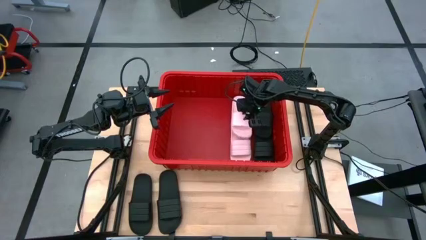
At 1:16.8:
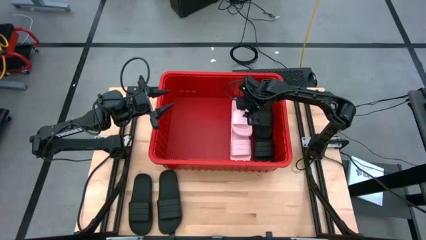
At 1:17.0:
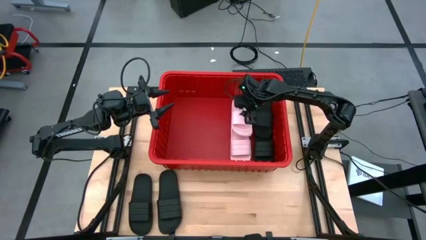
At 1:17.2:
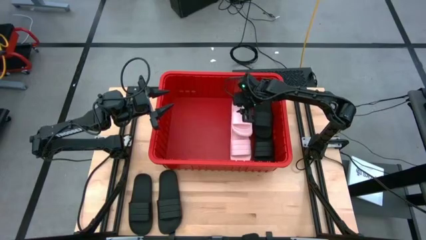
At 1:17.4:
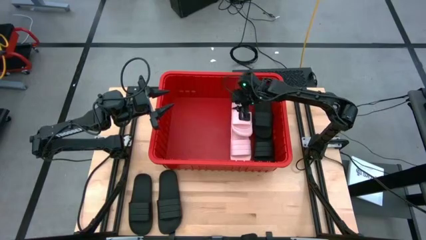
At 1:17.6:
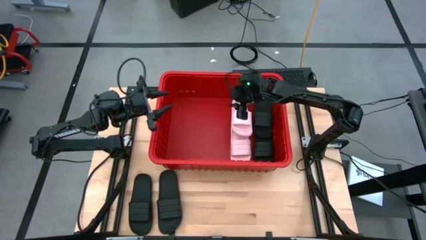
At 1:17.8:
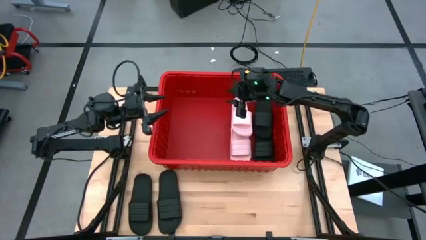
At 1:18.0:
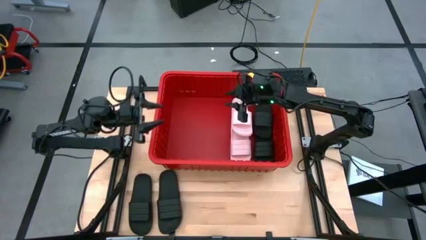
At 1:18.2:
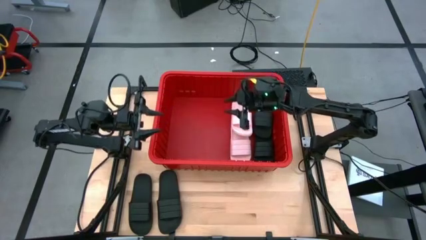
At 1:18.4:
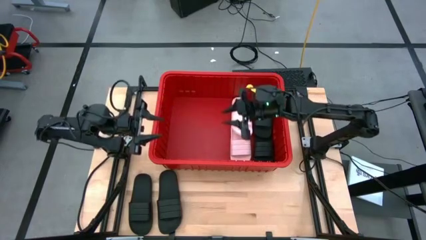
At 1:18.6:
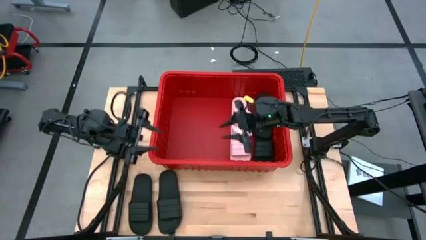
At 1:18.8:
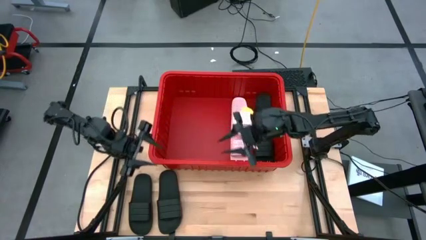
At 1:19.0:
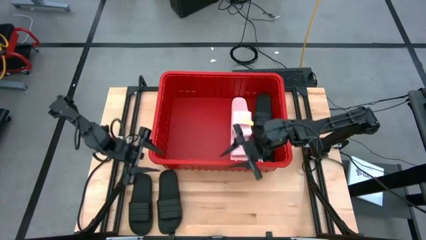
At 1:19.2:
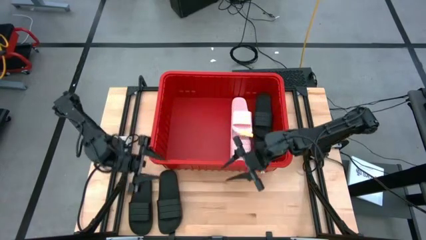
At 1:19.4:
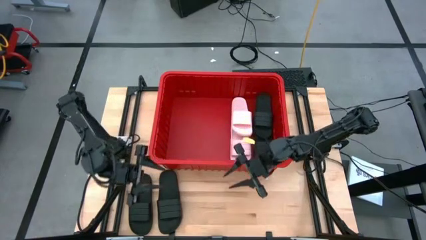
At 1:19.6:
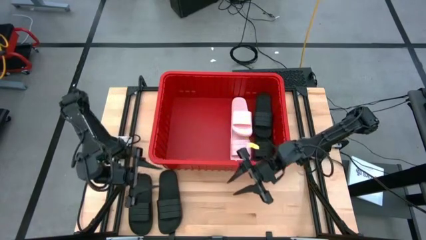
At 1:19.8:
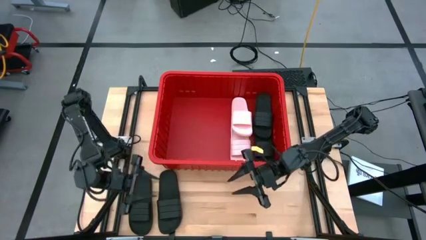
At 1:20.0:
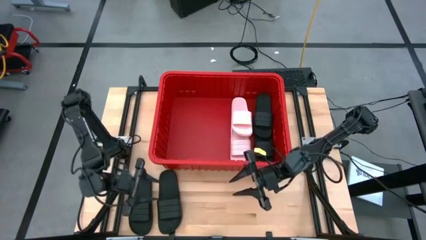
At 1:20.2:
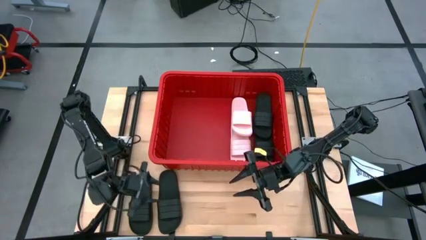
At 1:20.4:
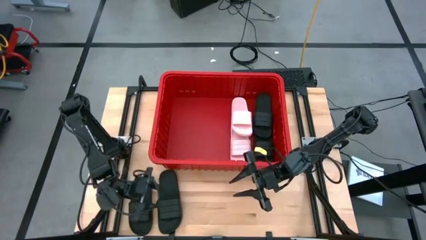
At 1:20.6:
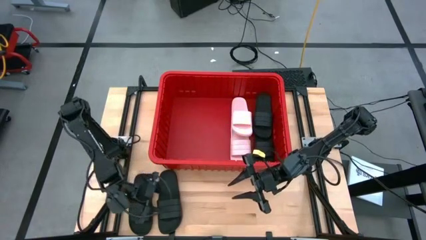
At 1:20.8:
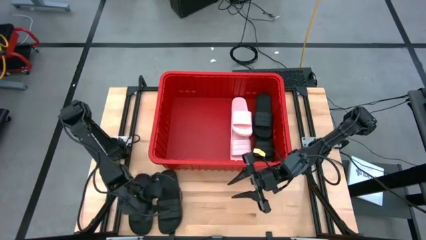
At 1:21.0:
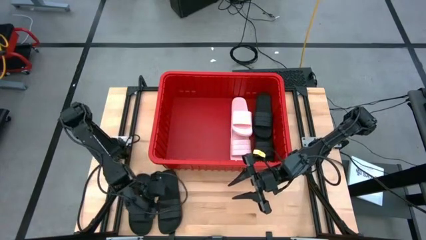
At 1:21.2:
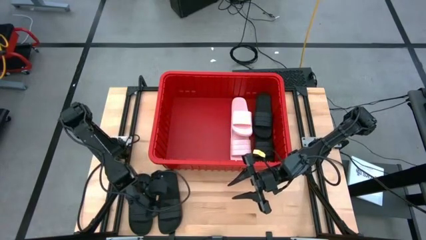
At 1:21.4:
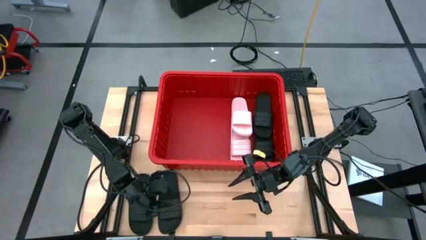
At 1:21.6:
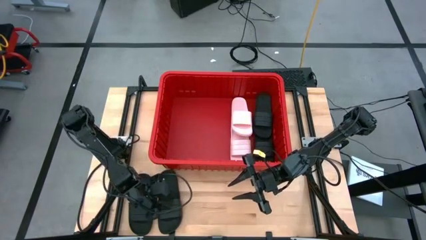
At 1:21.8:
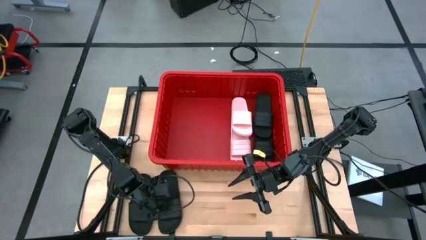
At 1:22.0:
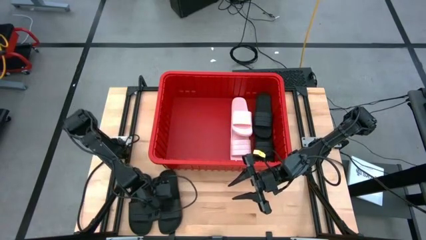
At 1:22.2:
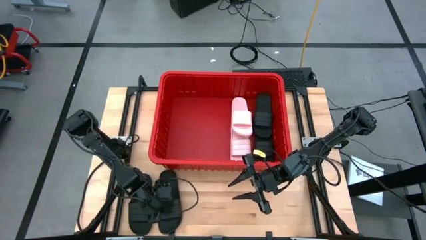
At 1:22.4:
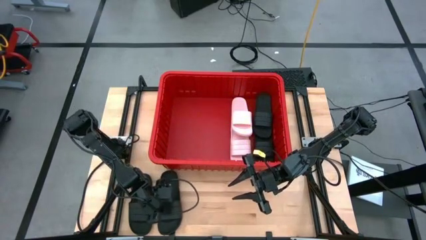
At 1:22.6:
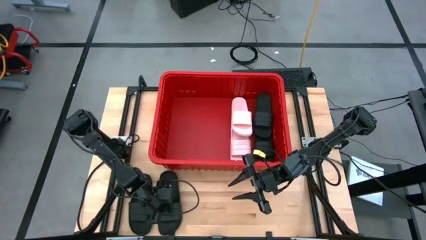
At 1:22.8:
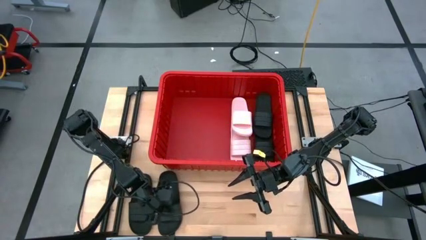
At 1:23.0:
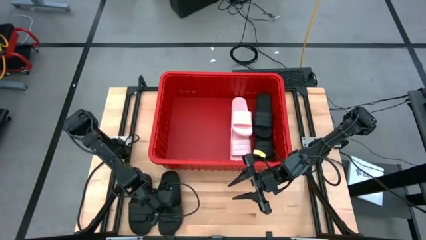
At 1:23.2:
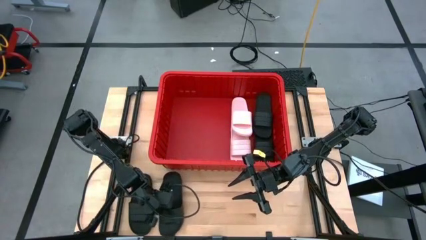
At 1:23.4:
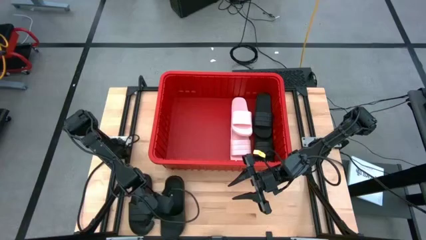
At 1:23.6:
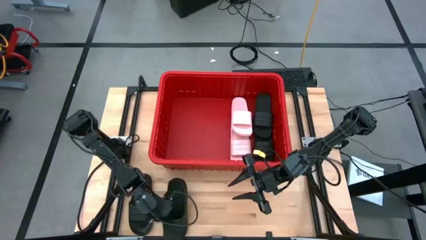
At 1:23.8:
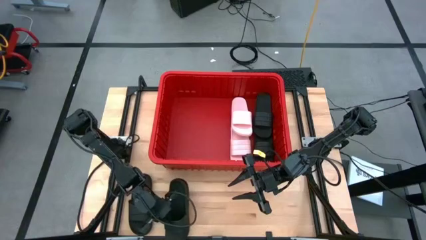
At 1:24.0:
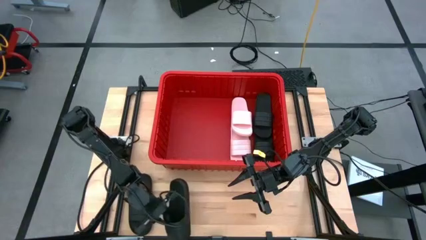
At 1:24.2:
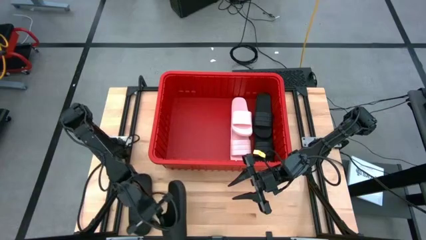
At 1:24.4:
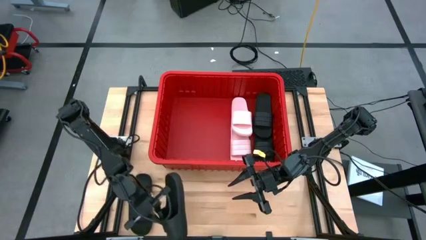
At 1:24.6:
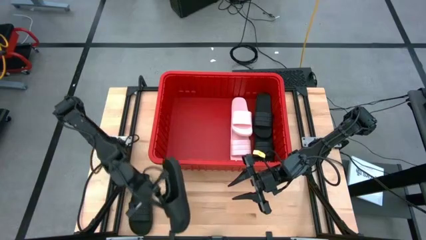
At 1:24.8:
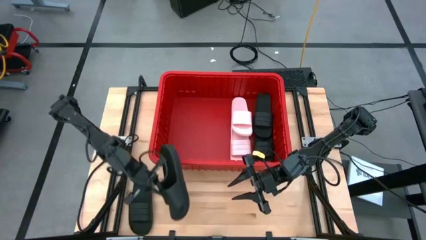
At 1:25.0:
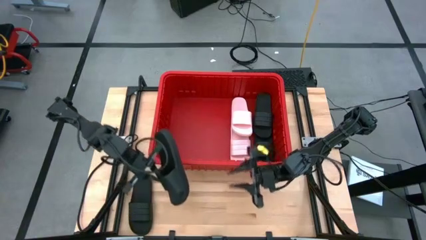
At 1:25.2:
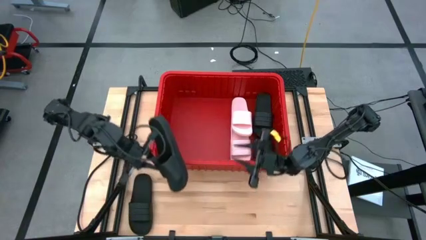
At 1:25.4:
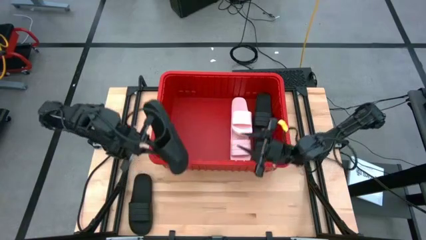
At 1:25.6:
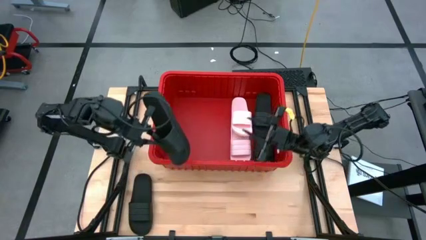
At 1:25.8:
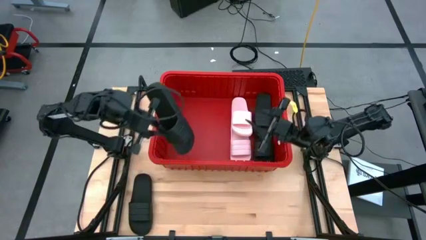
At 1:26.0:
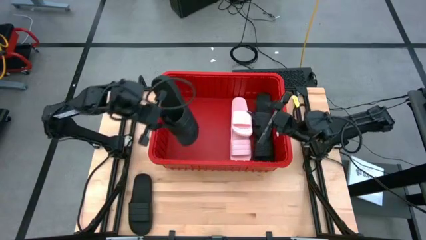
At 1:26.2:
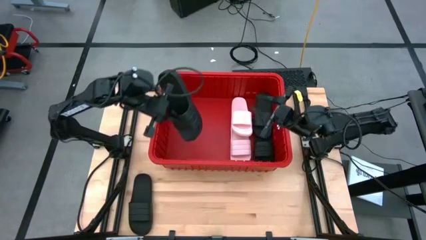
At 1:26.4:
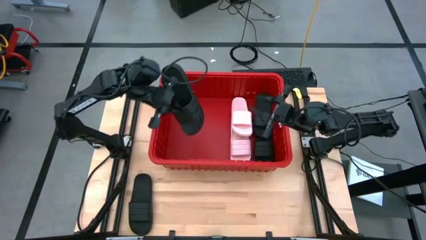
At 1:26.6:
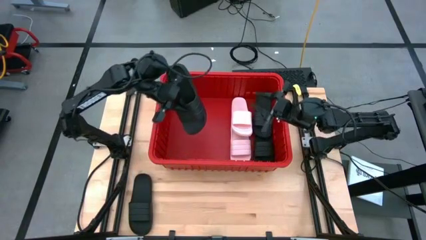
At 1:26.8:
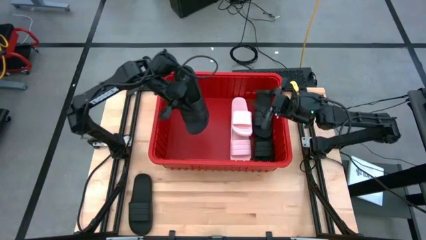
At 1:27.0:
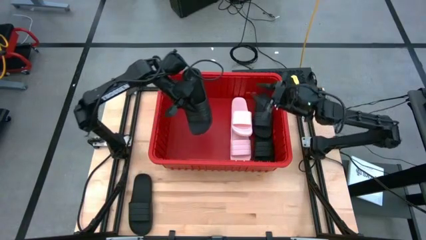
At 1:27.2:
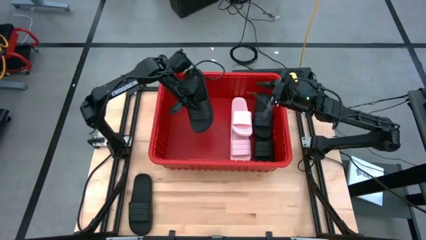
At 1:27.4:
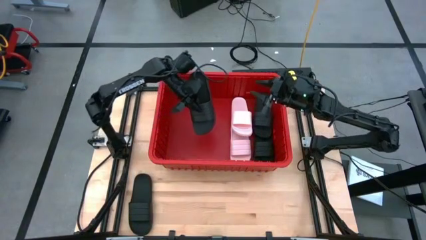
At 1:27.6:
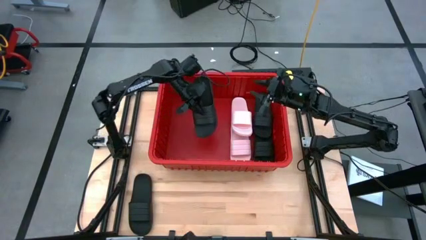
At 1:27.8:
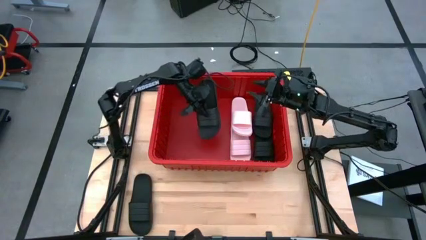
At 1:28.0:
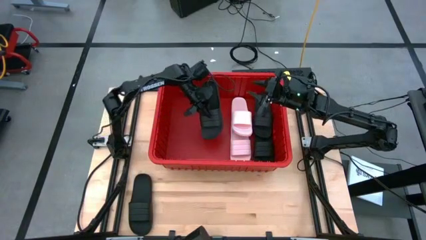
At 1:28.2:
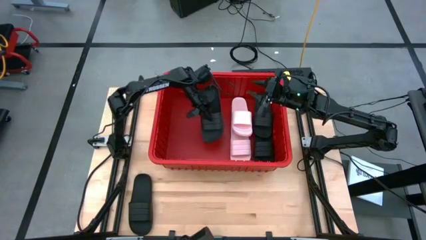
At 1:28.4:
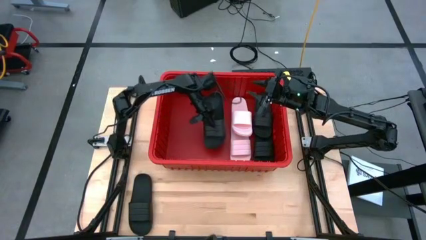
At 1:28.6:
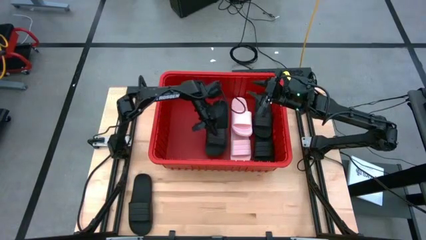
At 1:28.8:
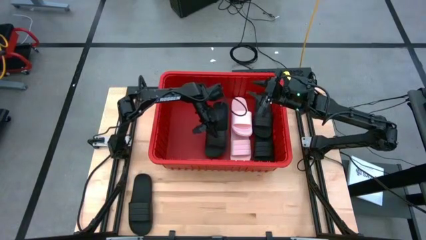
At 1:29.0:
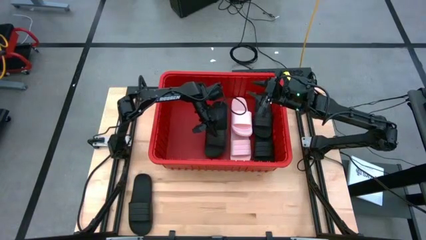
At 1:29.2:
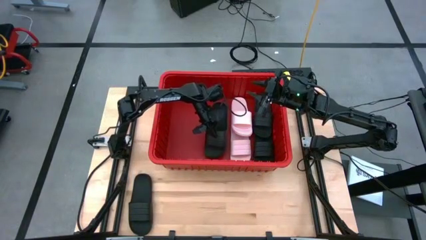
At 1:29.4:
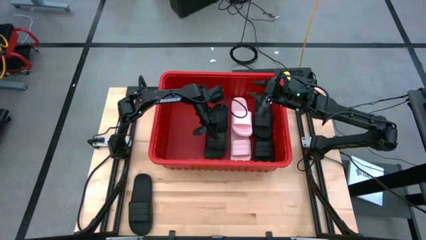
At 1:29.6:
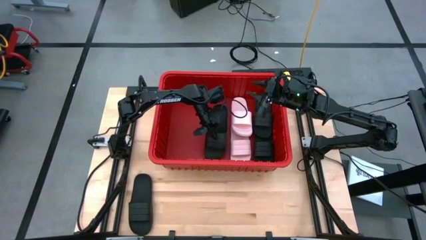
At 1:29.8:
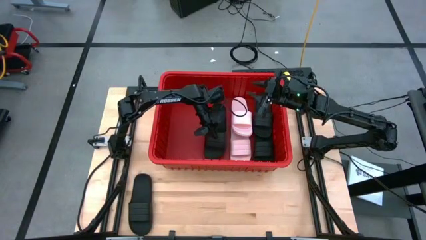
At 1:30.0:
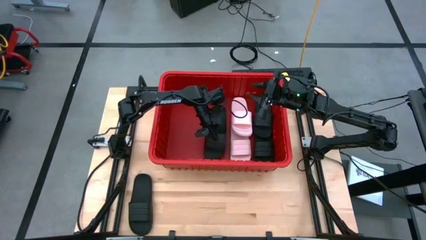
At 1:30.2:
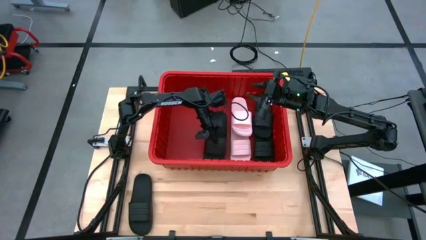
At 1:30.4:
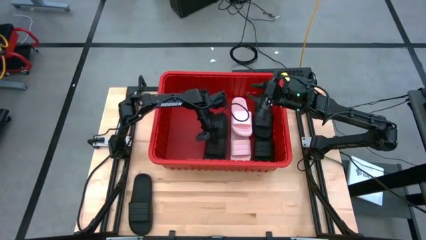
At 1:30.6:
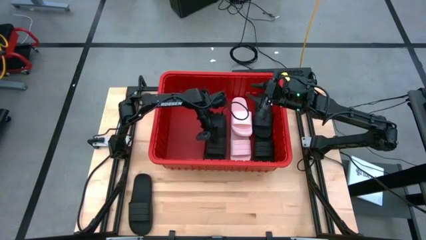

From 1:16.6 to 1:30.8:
Task: Pick and place slides into bin
Put the black slide into the red container

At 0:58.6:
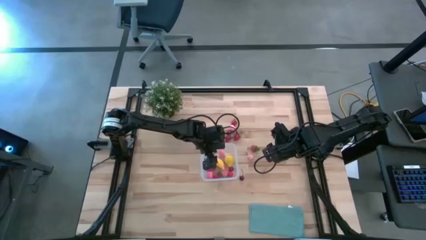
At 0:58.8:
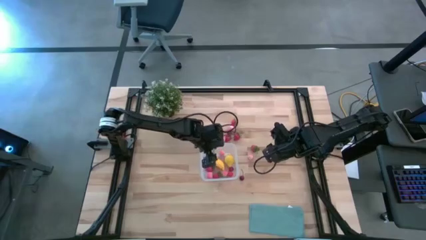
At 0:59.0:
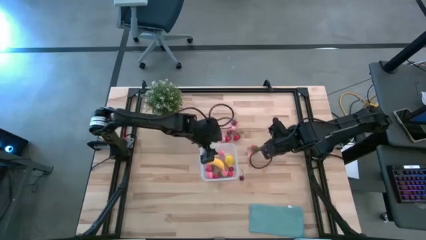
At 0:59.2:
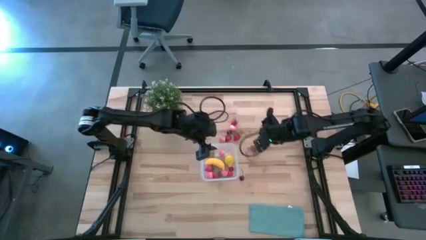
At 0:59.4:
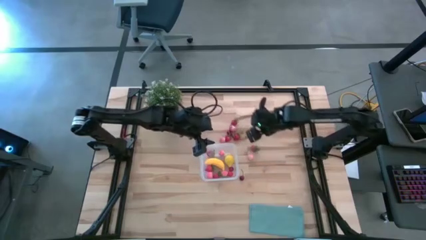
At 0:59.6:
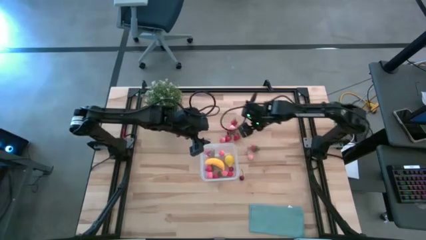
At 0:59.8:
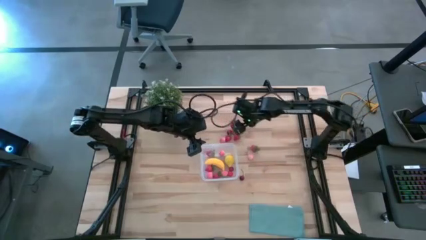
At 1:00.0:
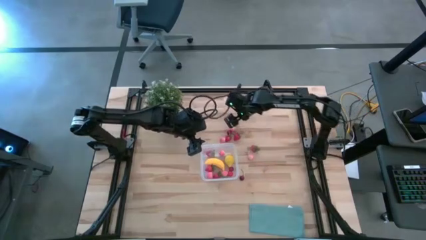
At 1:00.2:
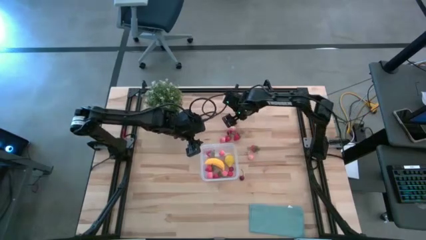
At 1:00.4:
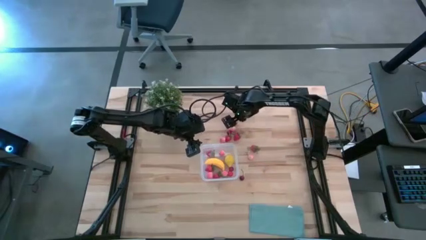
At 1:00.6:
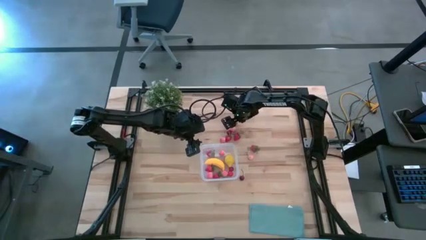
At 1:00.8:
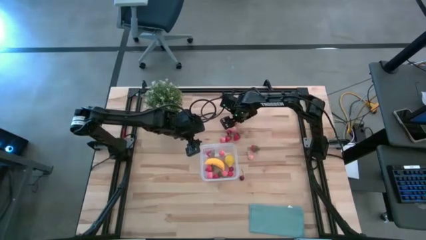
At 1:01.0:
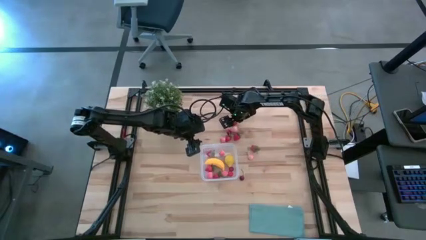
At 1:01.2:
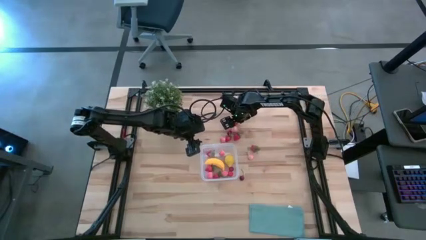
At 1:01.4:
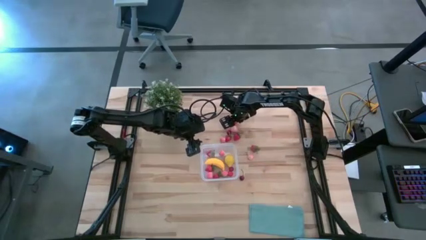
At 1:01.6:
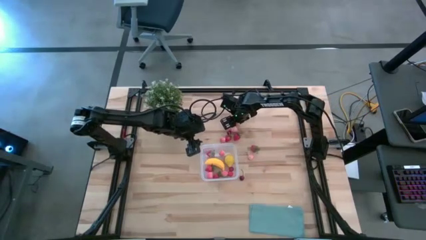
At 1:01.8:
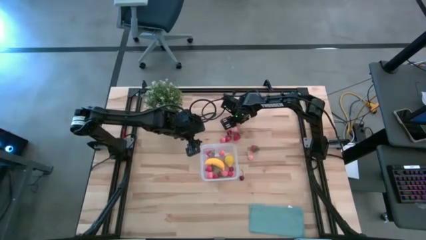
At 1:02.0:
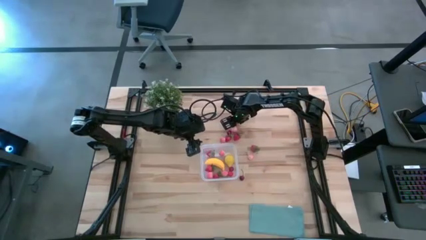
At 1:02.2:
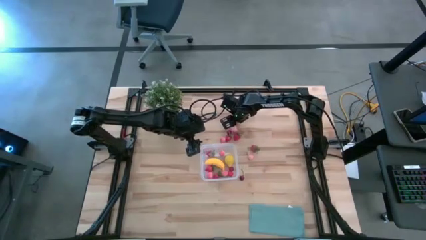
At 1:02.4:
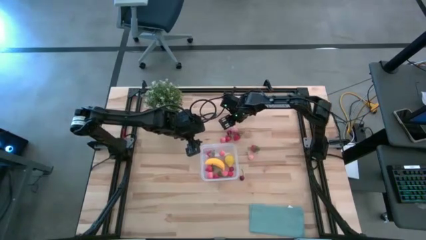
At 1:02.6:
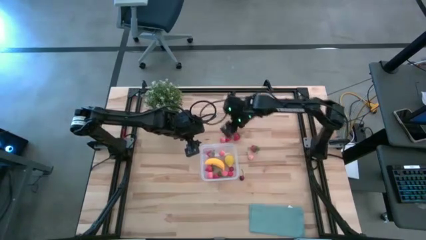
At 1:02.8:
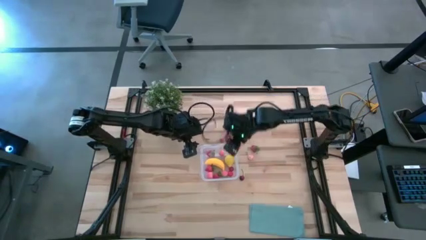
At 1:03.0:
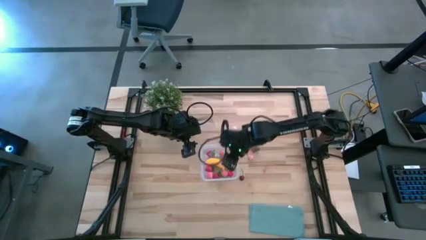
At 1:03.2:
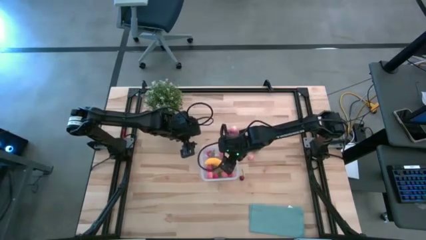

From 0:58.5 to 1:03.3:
Task: Pick and placing Produce into tupperware
Put the red strawberry into the transparent container
